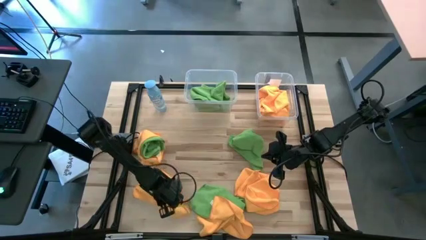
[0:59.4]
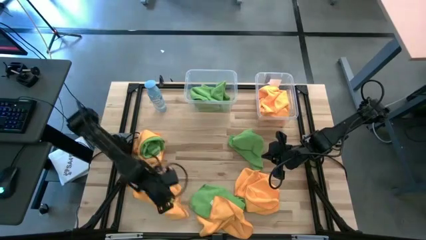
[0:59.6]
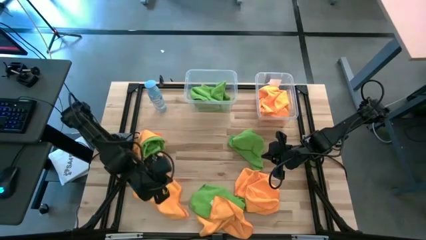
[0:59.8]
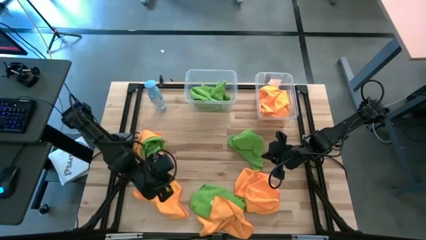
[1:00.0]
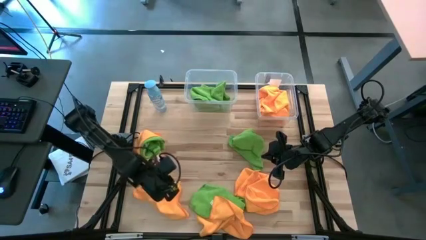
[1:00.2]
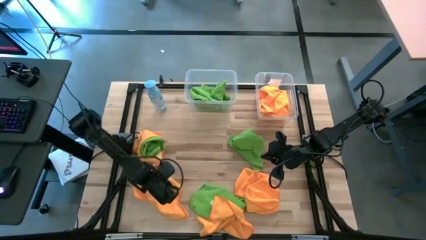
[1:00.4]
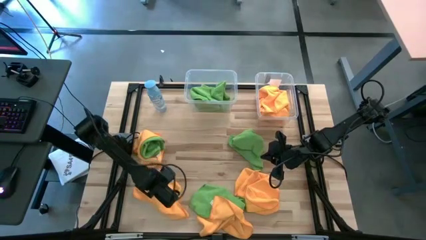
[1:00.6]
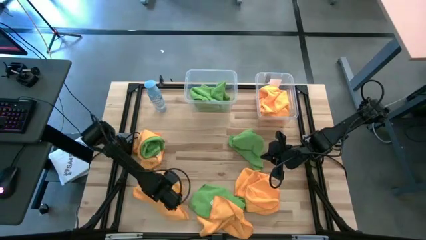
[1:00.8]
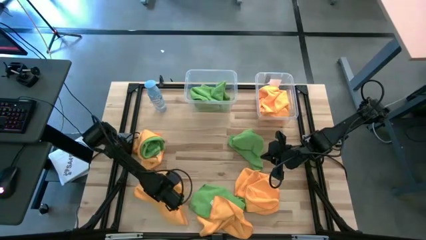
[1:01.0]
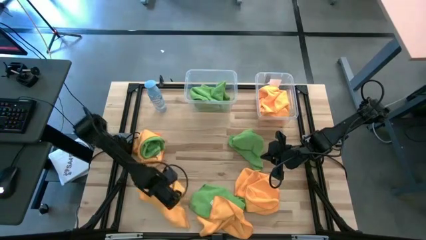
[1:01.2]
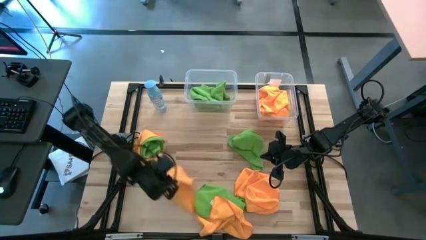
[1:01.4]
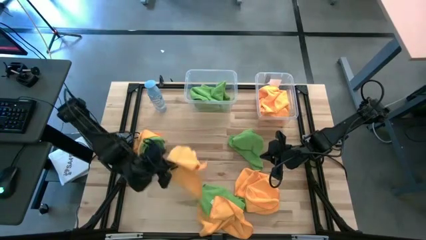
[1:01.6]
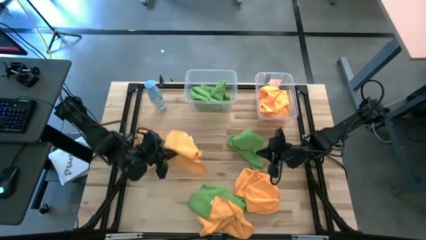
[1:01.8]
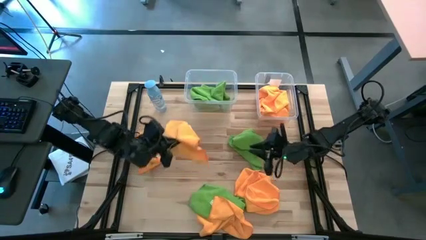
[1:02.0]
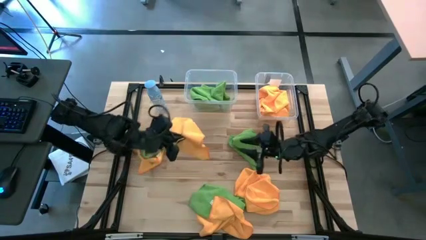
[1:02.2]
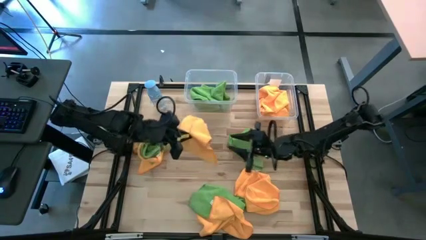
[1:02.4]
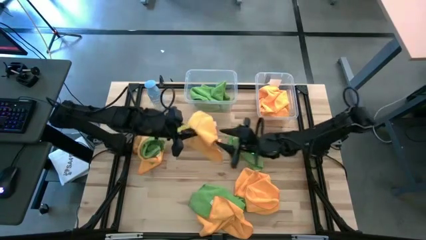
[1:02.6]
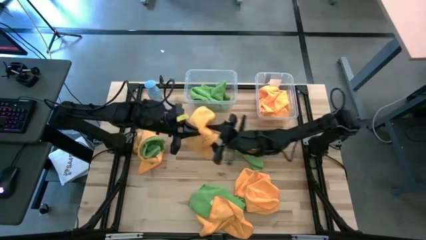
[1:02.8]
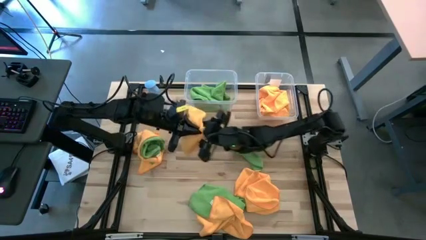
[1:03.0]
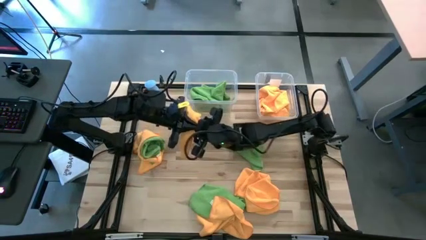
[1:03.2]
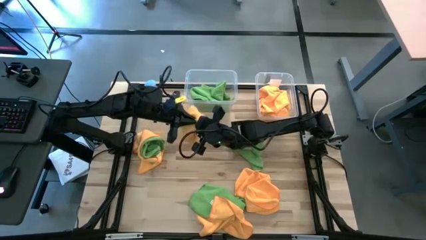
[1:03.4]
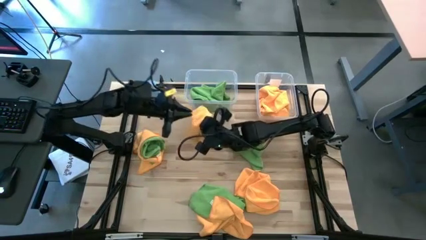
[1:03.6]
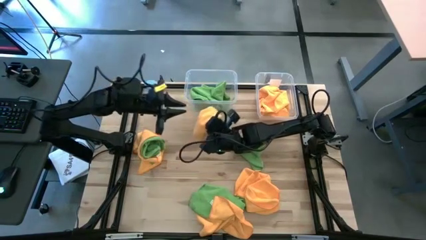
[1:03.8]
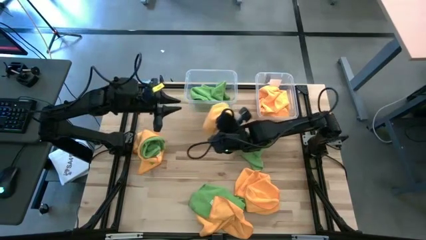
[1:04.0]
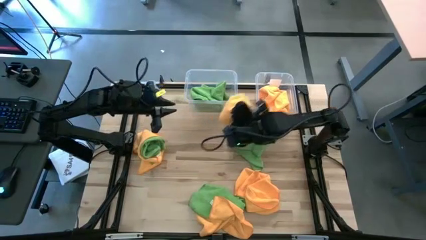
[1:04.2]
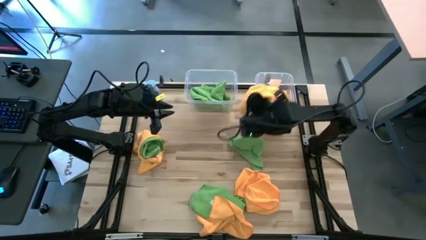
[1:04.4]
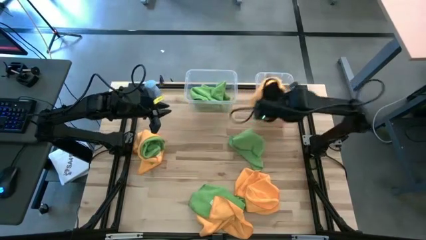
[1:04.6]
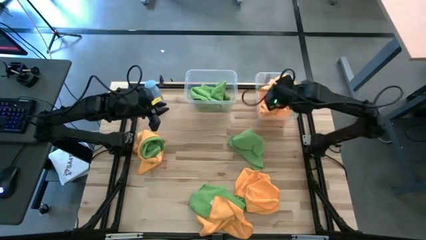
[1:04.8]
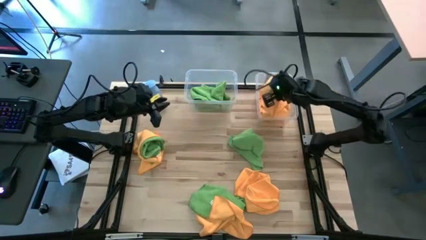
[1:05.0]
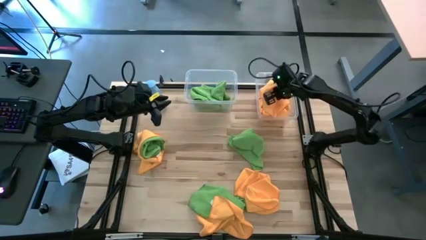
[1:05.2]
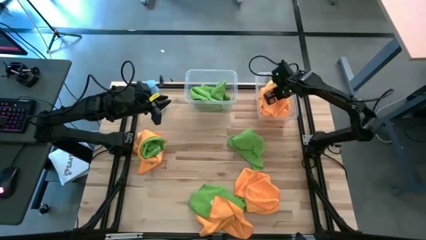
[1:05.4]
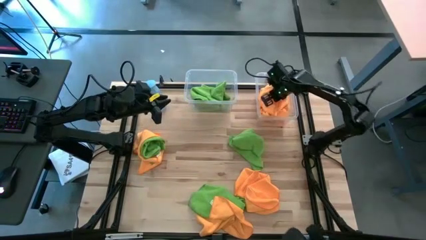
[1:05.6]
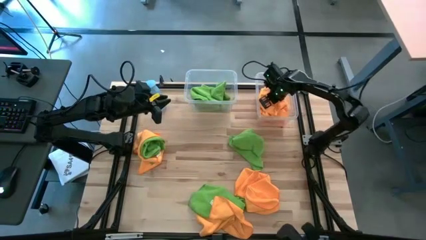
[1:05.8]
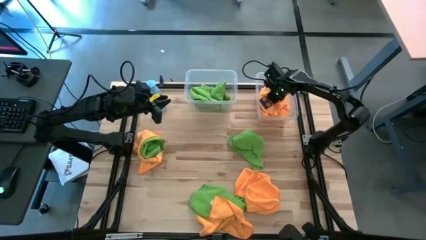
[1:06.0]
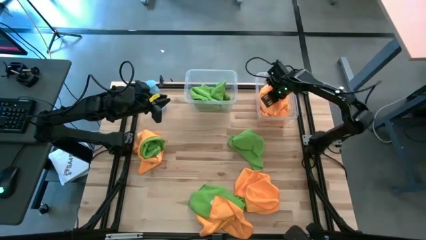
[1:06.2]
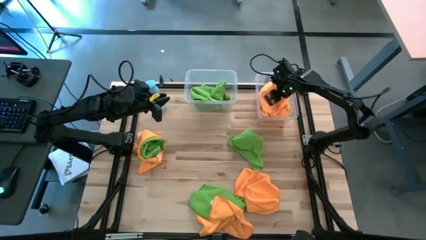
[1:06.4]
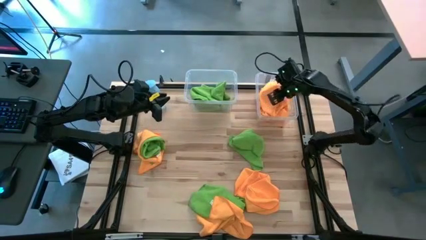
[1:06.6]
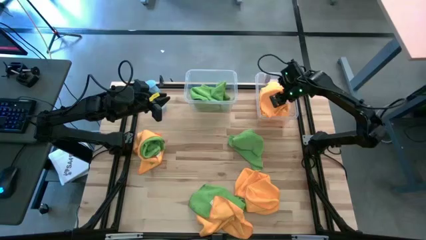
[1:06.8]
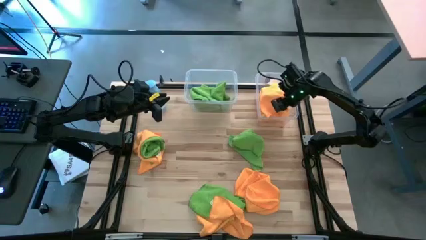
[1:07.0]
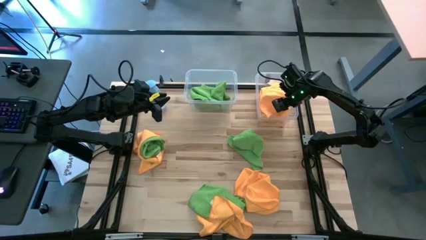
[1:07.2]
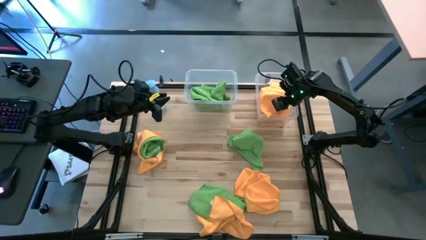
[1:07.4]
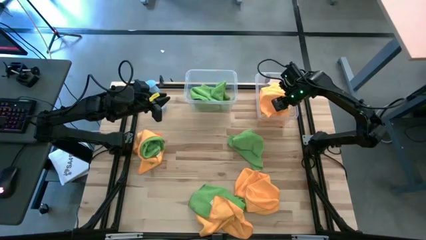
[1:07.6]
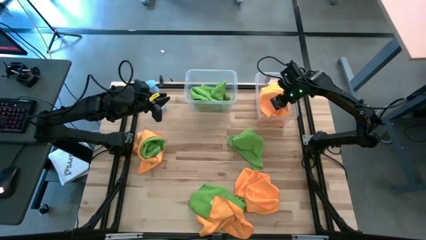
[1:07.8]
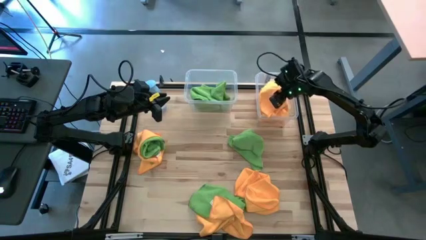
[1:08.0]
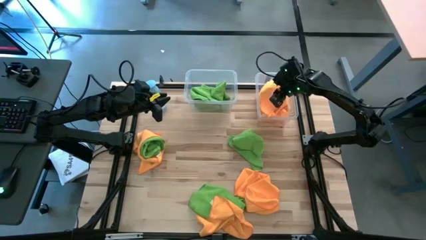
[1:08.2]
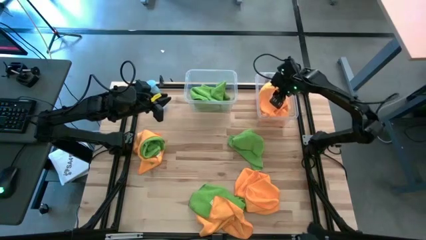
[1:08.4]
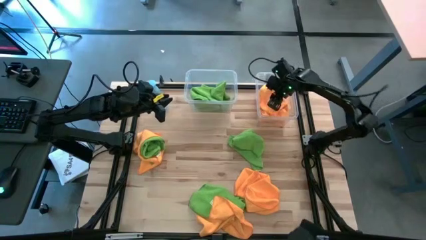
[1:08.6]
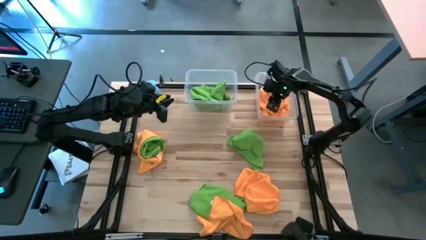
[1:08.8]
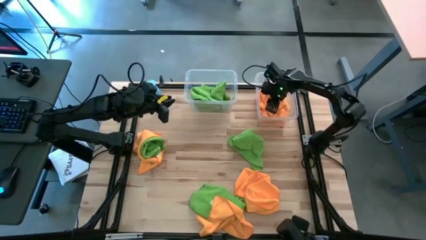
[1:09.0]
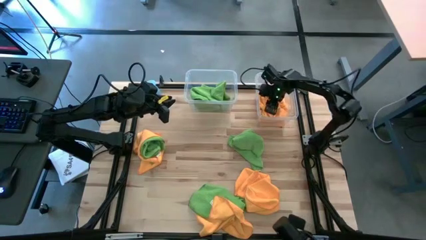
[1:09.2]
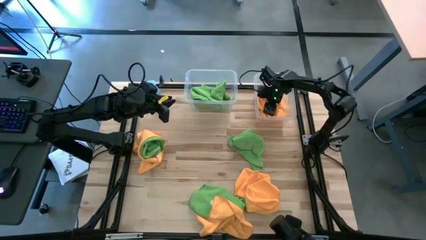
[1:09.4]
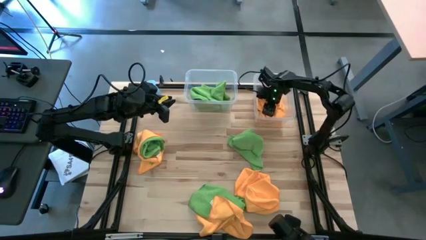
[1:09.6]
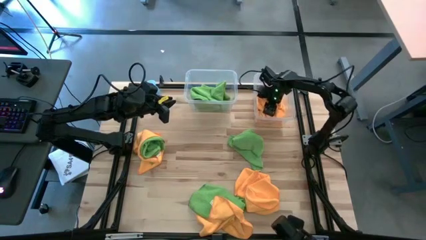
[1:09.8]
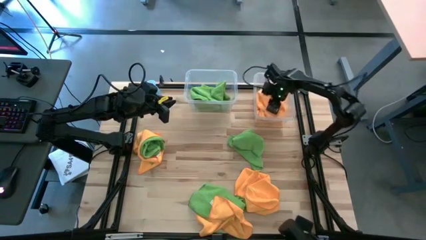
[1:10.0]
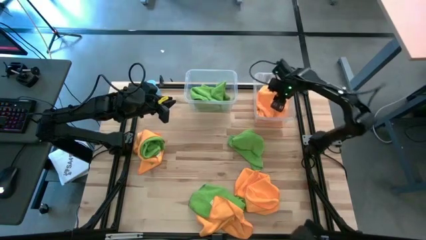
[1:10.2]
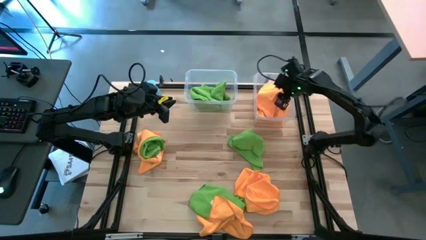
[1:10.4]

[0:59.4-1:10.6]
Task: Sort microfiber towel by color & place in baskets
Put the yellow towel into the right transparent bin

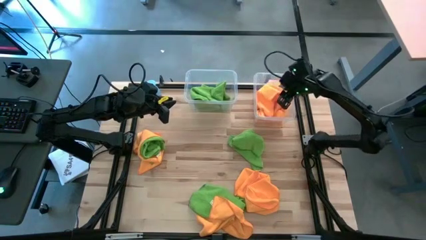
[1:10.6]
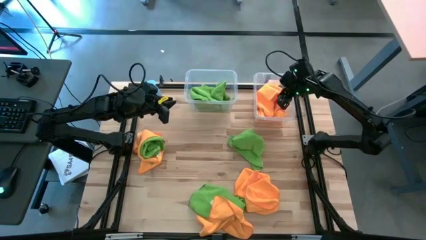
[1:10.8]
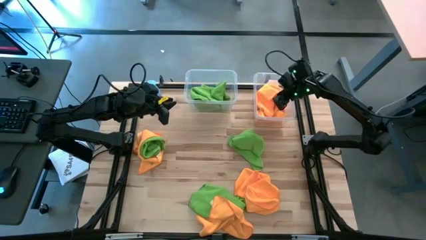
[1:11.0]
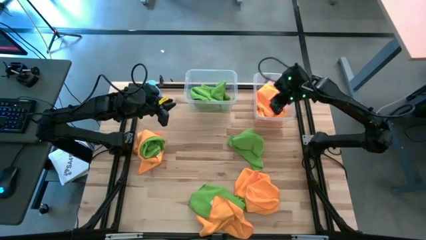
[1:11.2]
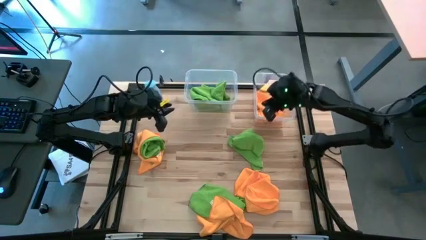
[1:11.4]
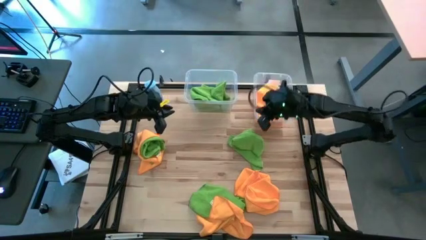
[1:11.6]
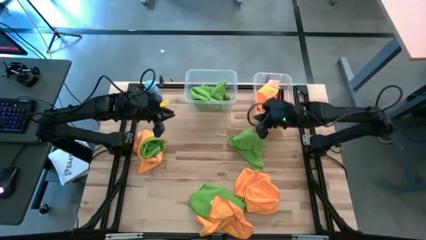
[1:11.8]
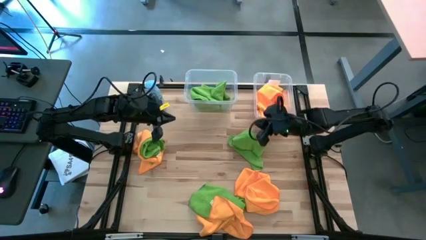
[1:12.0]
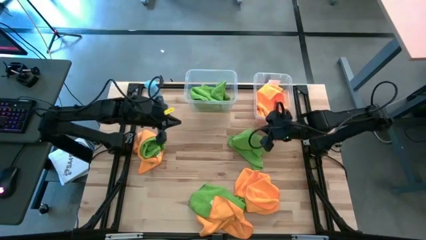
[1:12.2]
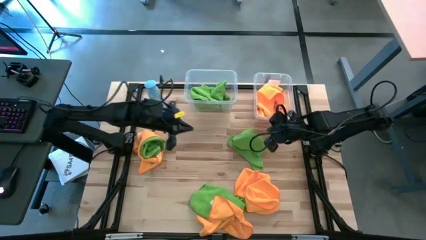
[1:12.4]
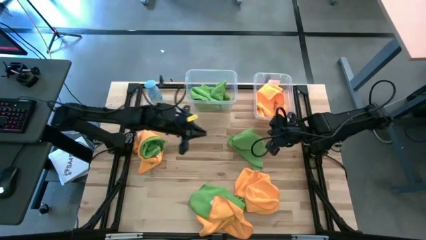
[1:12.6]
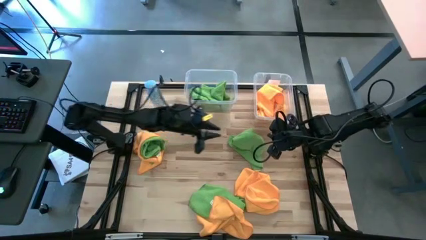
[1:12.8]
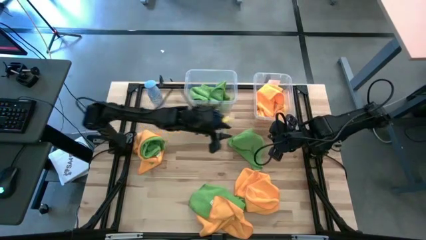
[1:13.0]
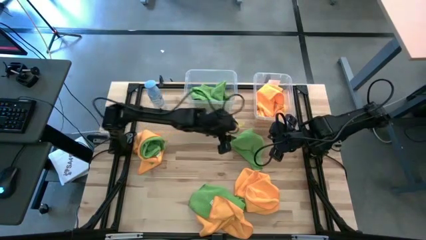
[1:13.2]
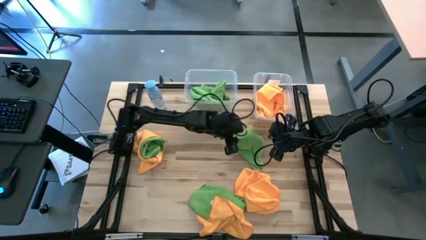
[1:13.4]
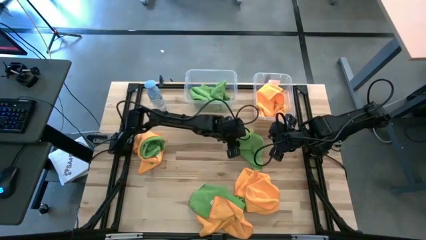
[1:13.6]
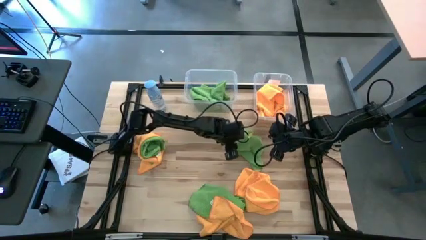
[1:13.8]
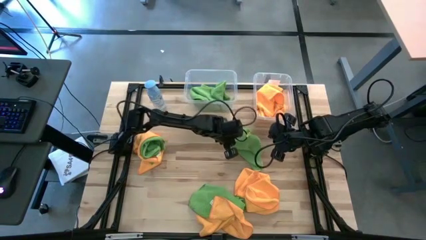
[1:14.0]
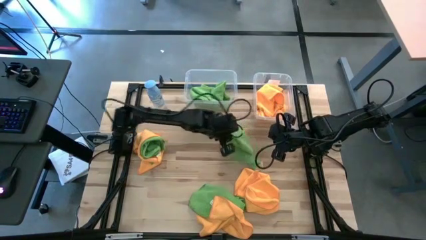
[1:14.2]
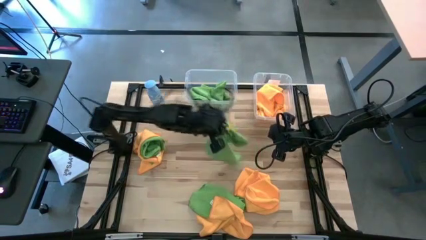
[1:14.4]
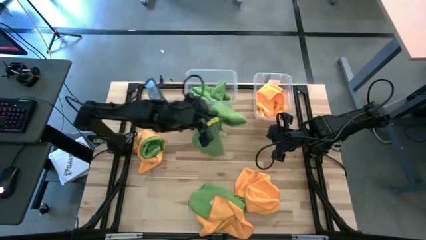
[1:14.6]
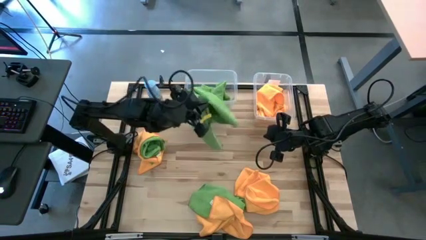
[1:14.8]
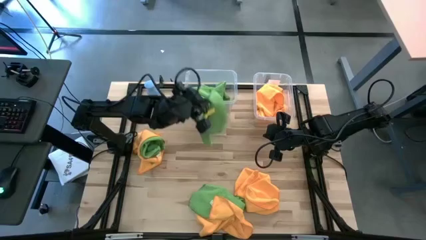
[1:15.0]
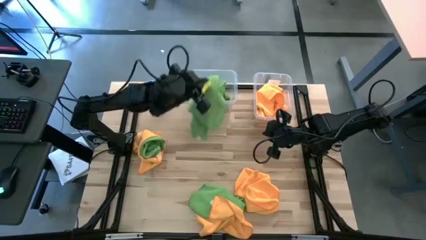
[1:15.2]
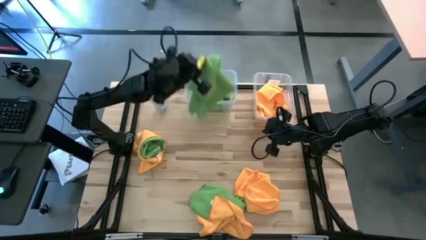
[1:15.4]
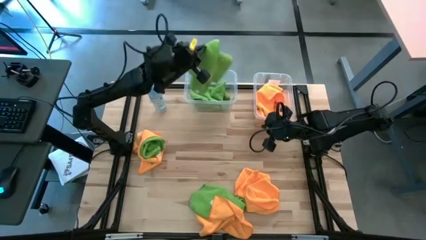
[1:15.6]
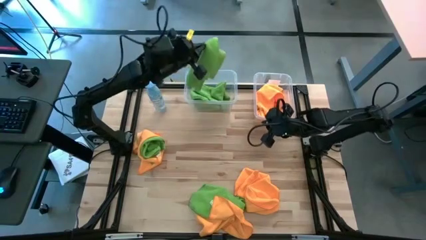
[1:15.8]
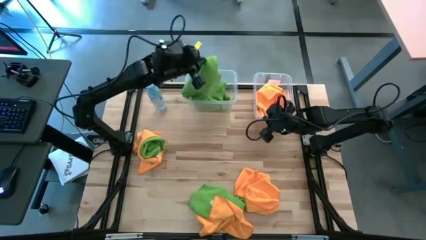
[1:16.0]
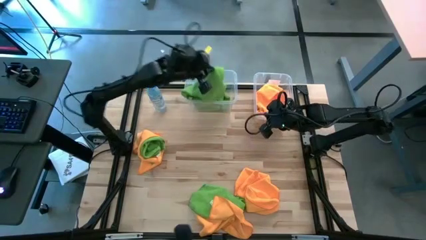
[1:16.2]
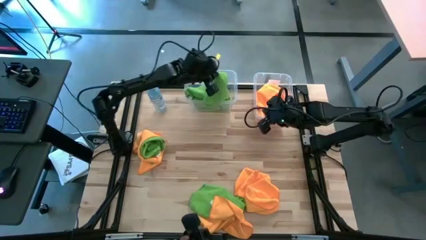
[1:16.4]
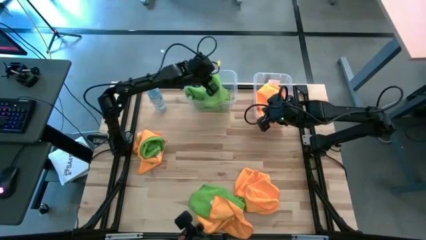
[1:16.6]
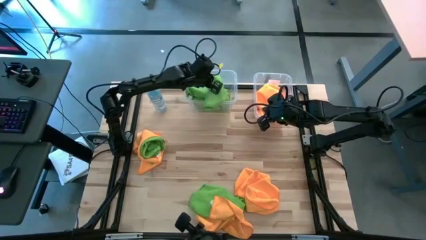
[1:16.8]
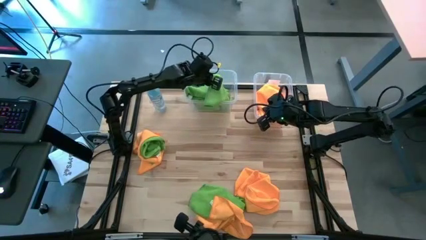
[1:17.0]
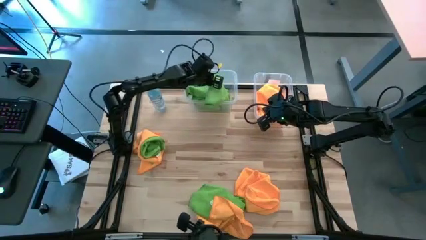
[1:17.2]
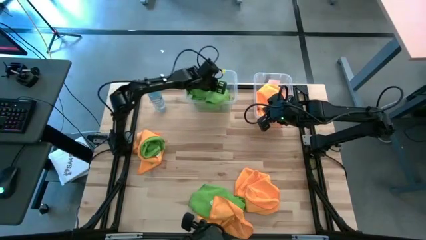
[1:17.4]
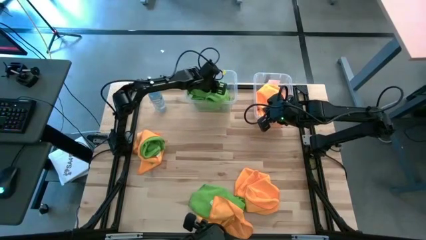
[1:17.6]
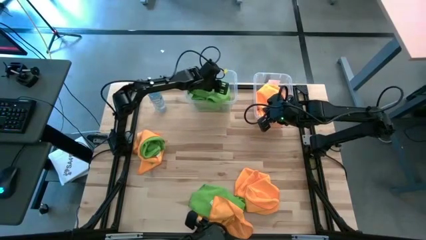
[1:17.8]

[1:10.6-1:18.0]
Put the green towel into the left transparent bin
